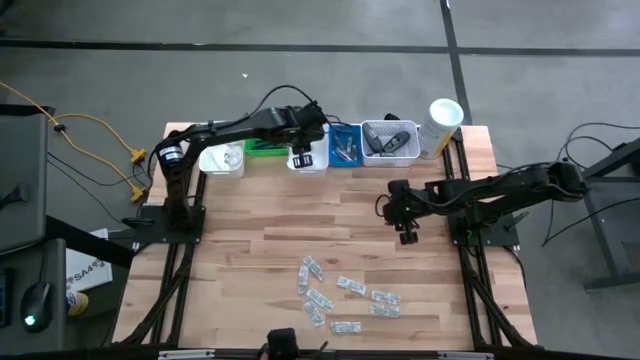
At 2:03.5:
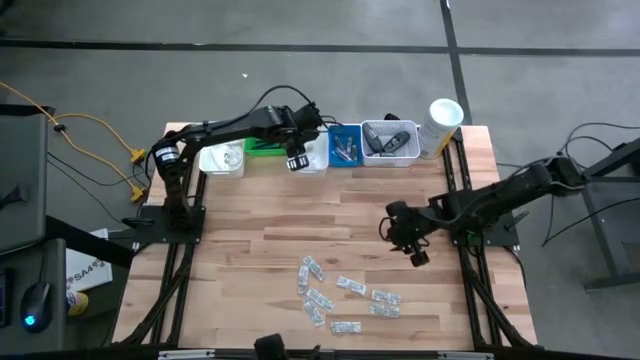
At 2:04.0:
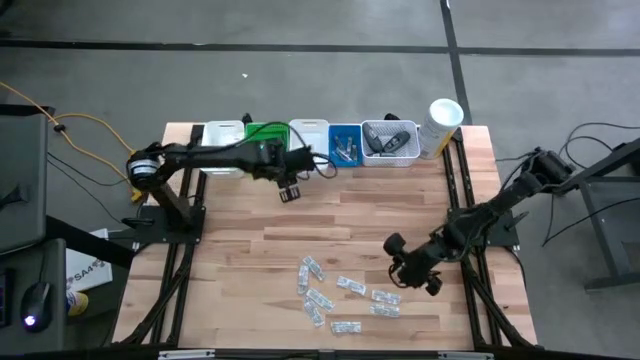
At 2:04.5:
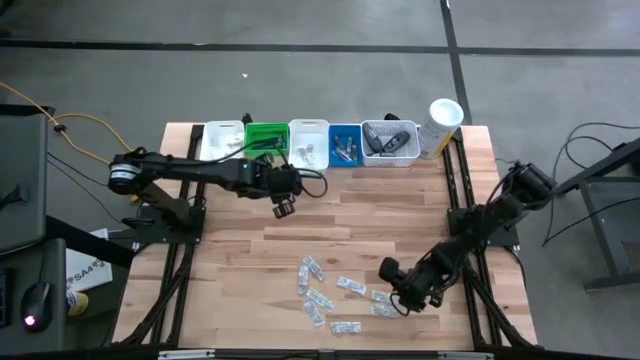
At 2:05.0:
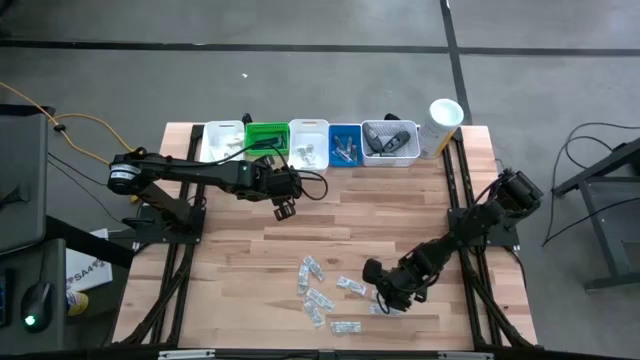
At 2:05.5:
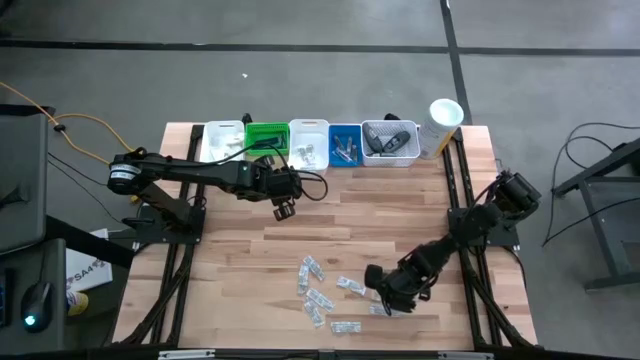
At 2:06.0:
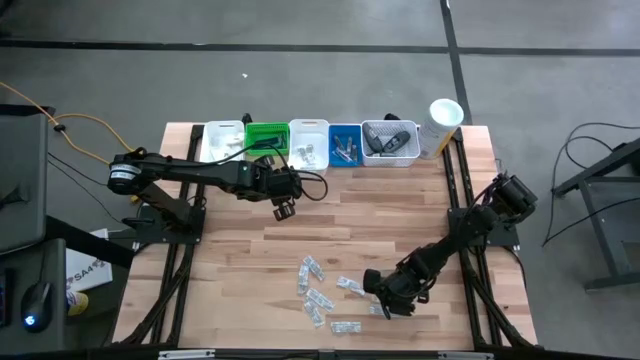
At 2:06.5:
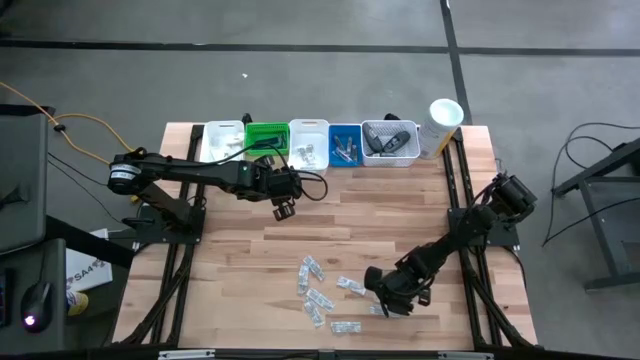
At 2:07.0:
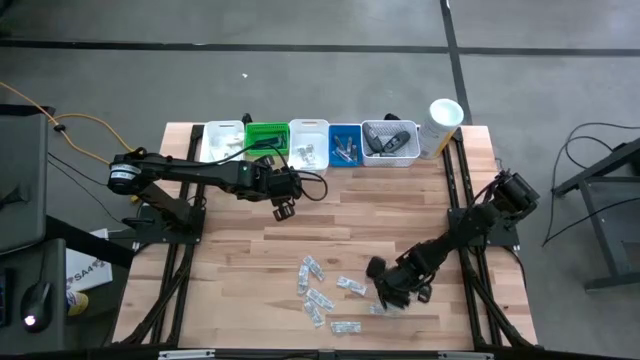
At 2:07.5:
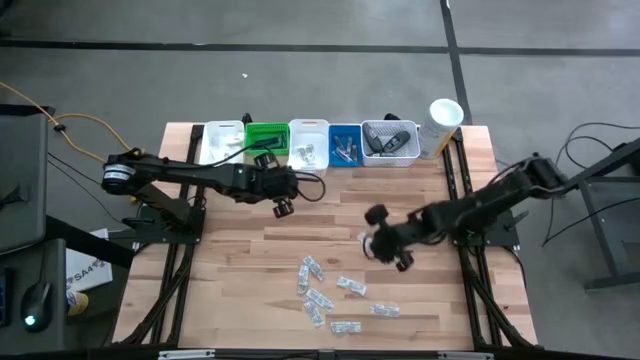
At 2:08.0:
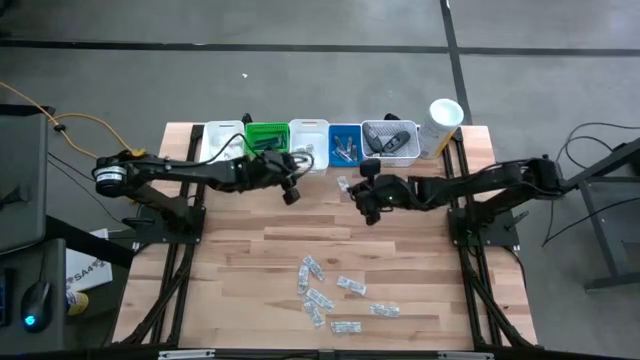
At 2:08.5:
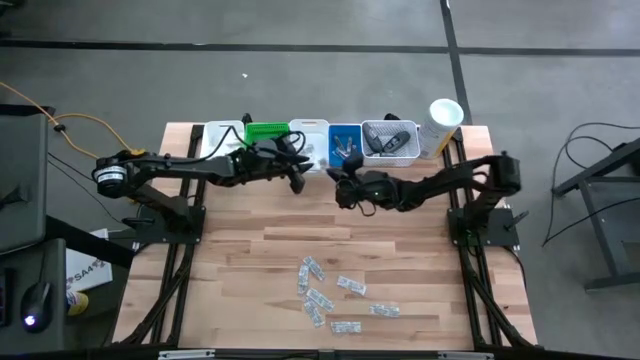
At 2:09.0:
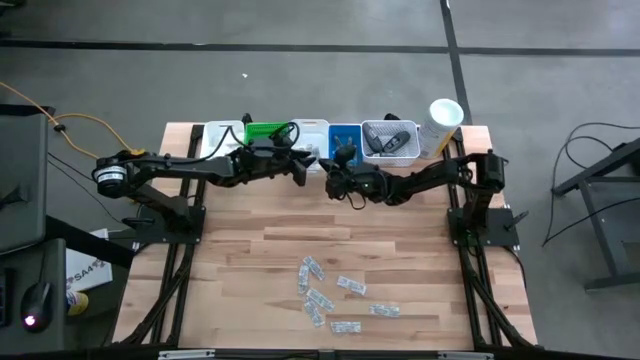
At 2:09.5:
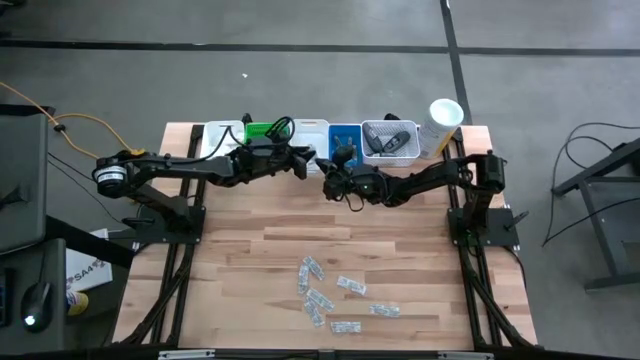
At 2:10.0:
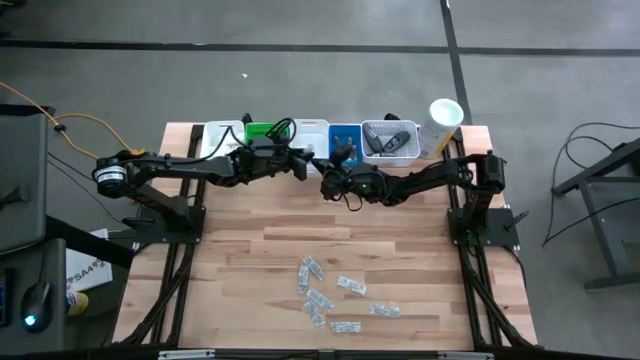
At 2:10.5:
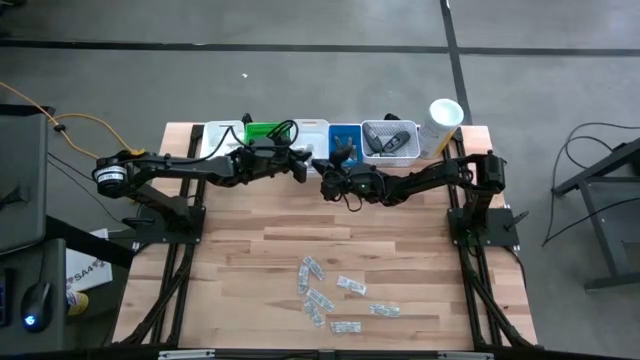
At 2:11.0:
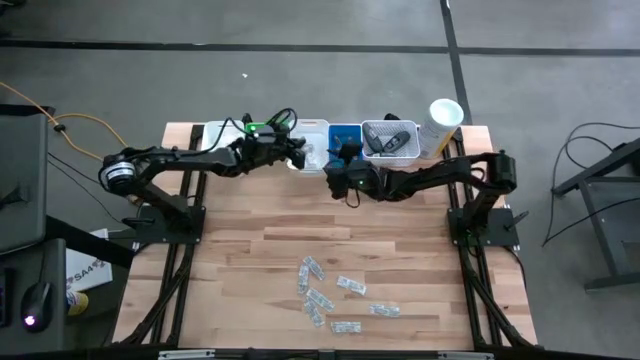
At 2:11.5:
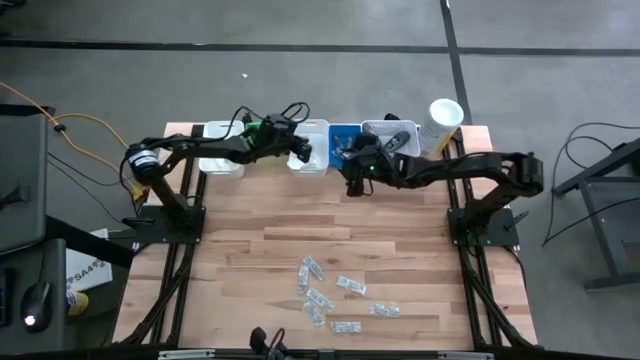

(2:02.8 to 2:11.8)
Task: Pick & Place Travel size toiletries
Put the white bandage into the middle white bin

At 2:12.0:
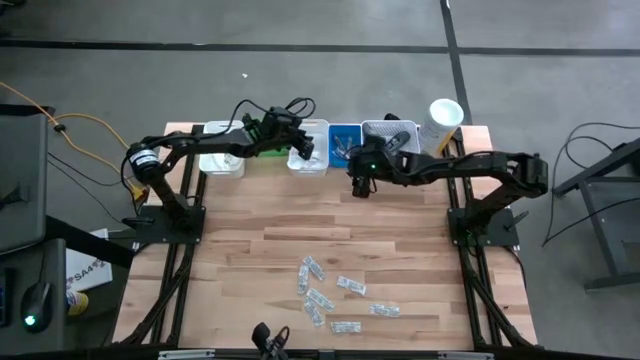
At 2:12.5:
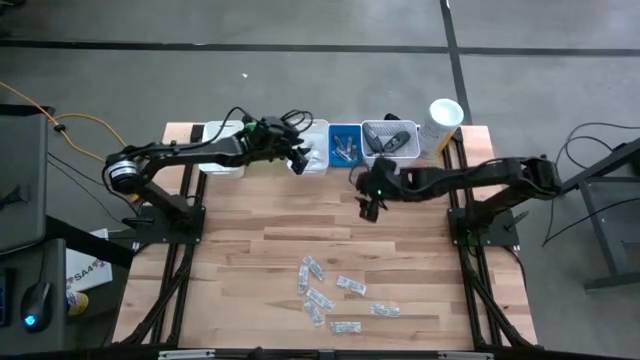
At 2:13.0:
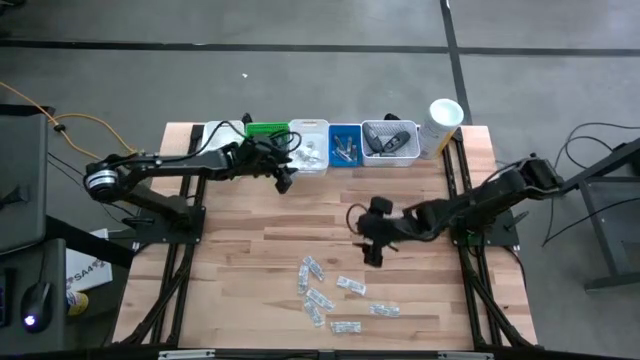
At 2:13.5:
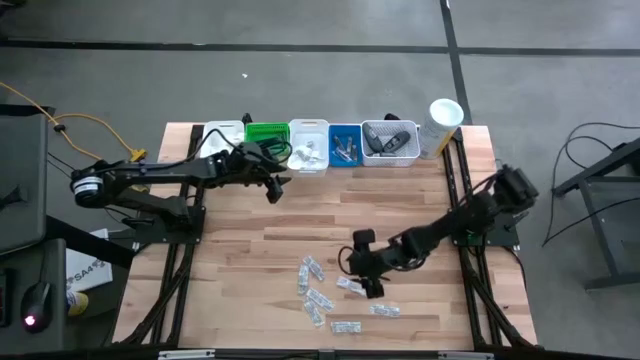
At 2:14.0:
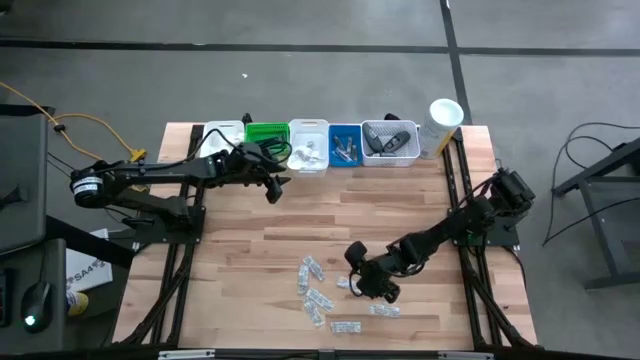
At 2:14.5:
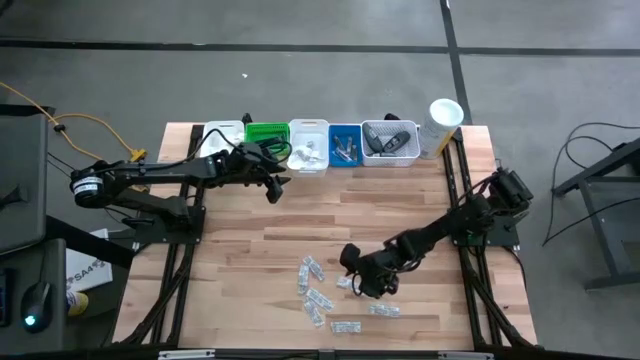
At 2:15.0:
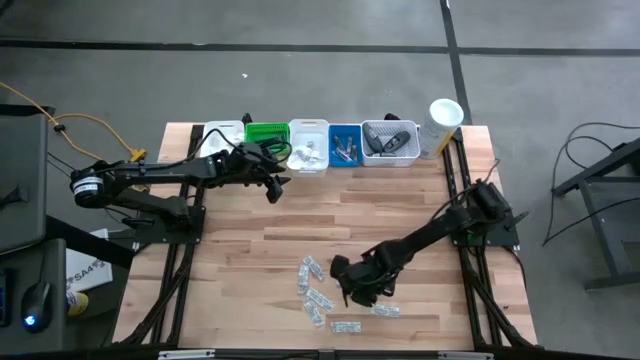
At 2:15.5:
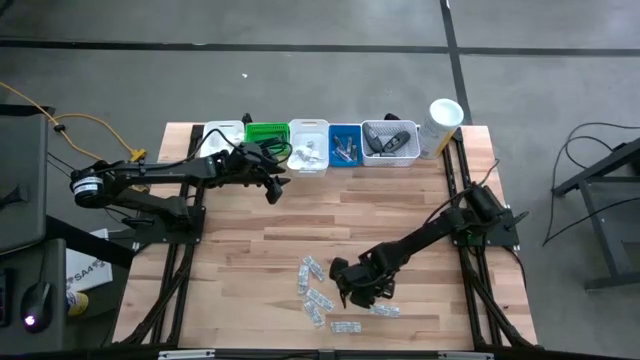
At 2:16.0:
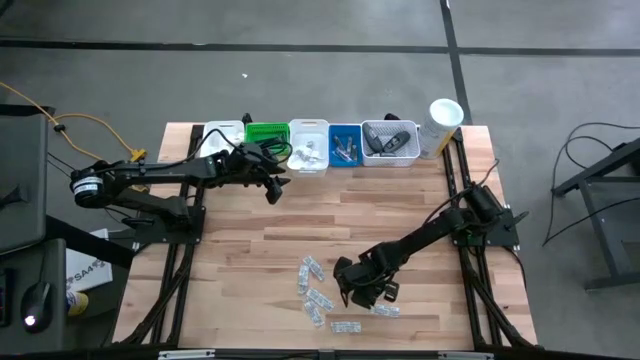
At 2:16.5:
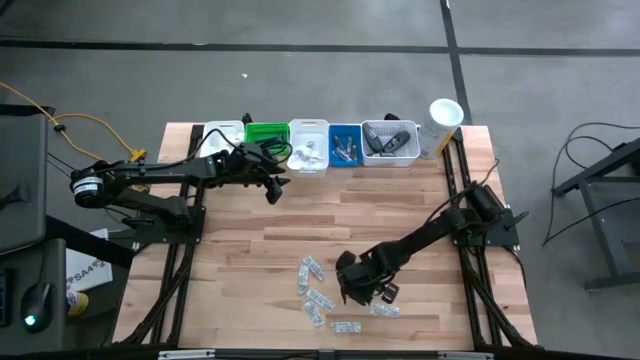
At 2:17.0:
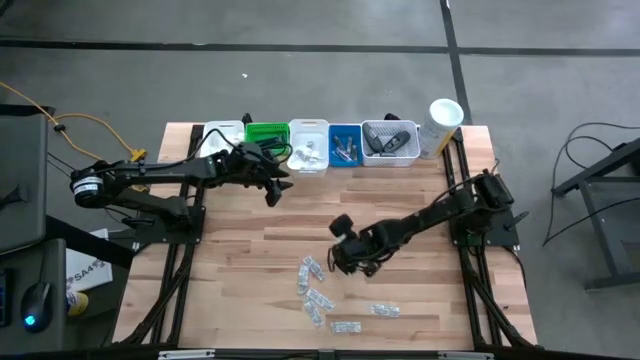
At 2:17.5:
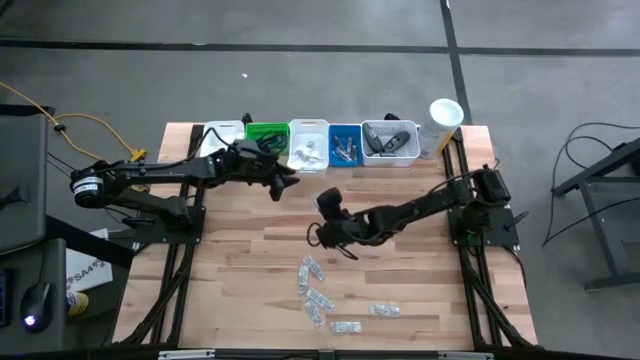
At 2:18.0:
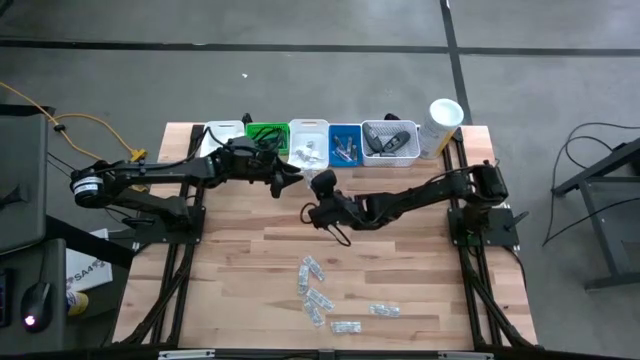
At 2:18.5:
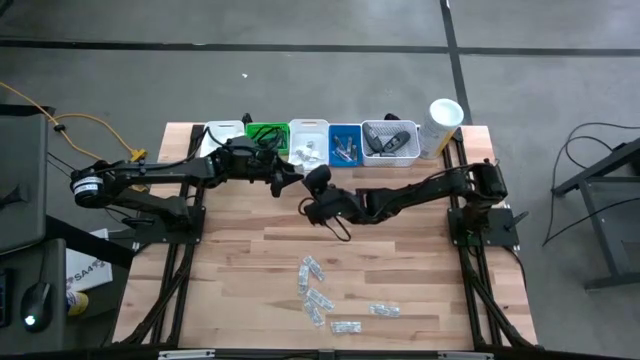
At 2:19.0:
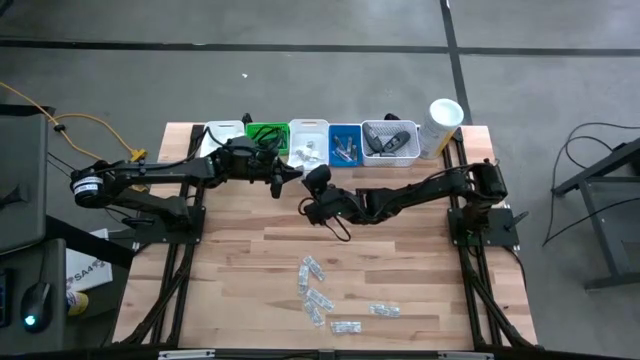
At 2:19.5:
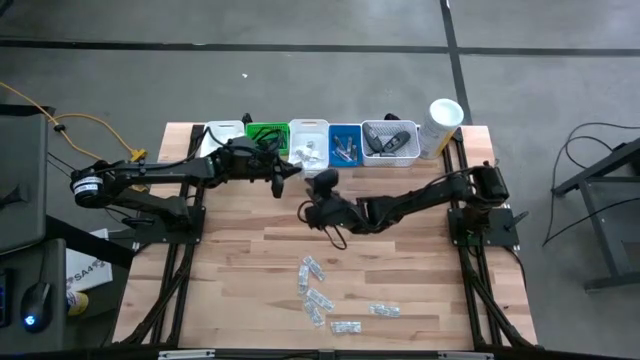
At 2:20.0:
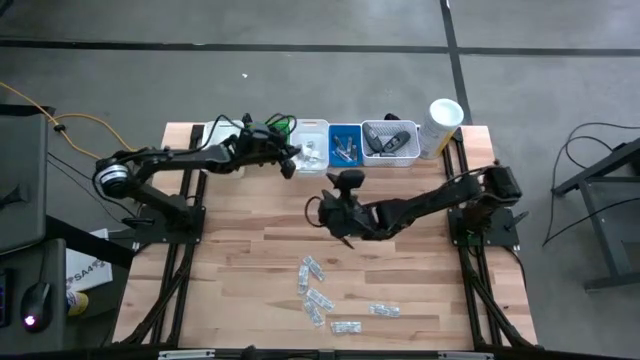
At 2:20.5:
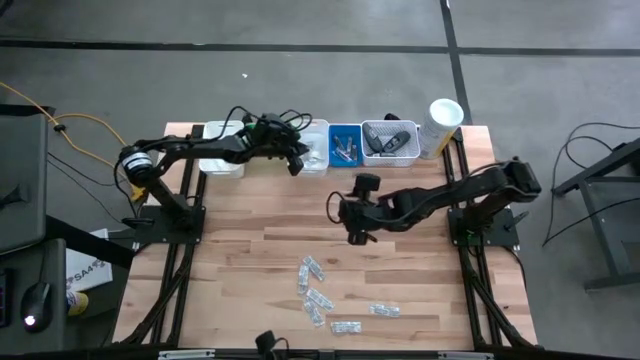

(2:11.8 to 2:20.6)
Put the white bandage into the middle white bin

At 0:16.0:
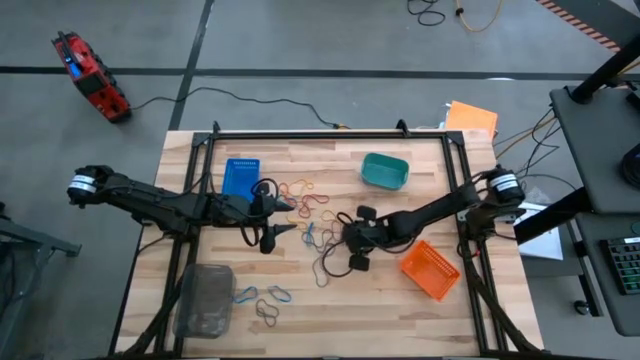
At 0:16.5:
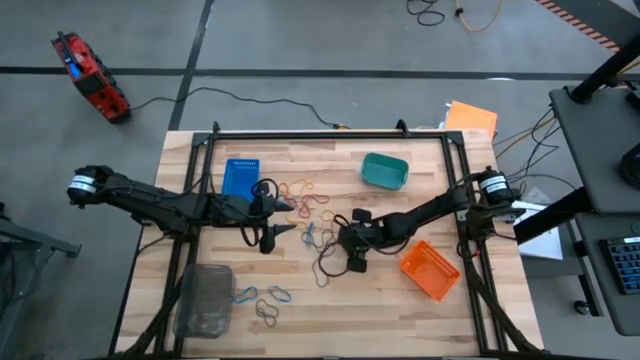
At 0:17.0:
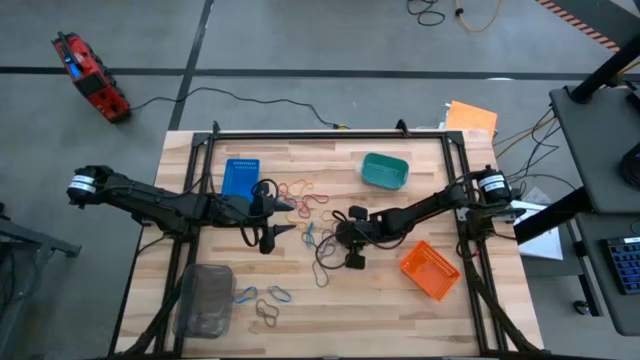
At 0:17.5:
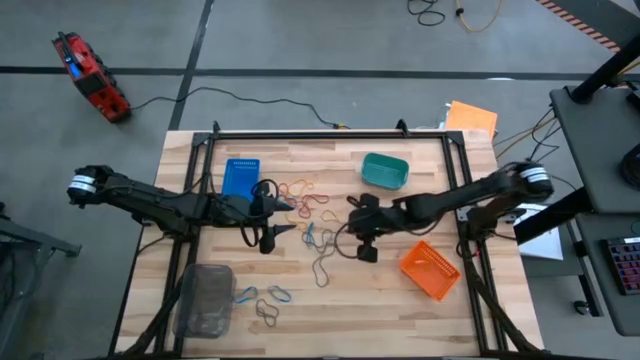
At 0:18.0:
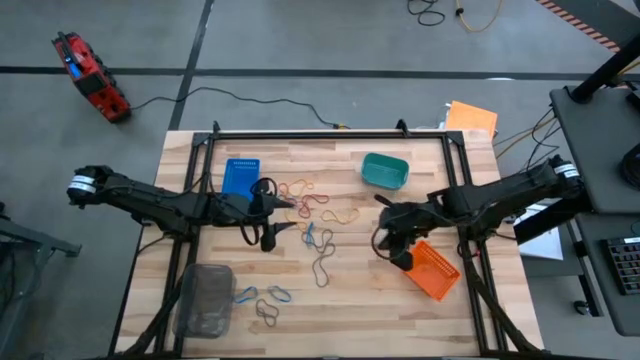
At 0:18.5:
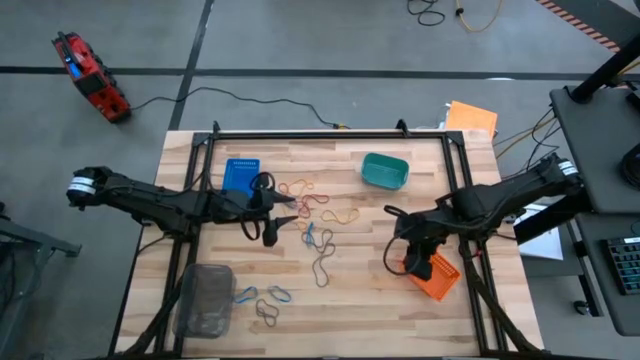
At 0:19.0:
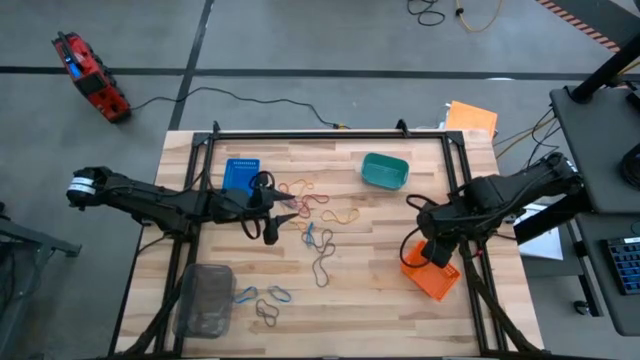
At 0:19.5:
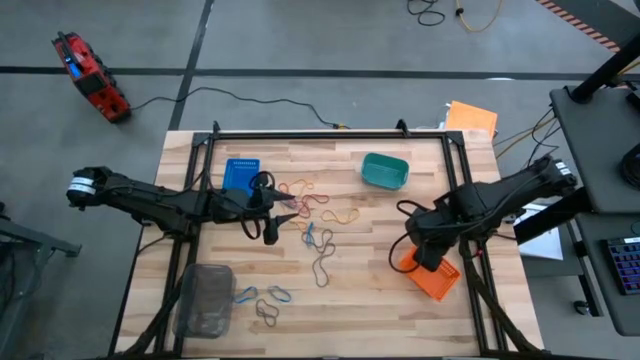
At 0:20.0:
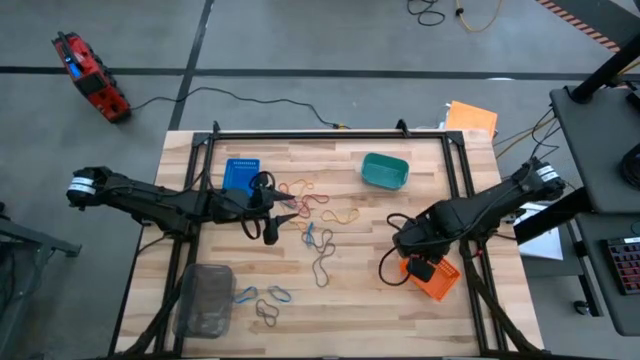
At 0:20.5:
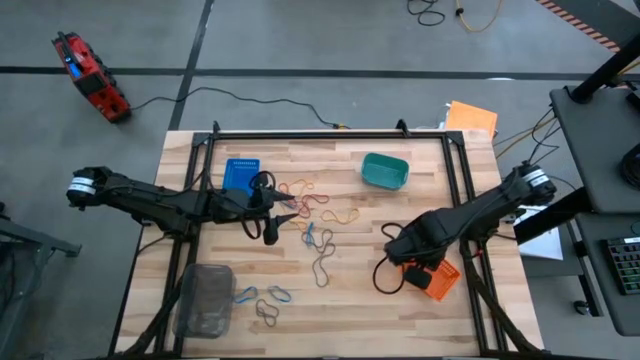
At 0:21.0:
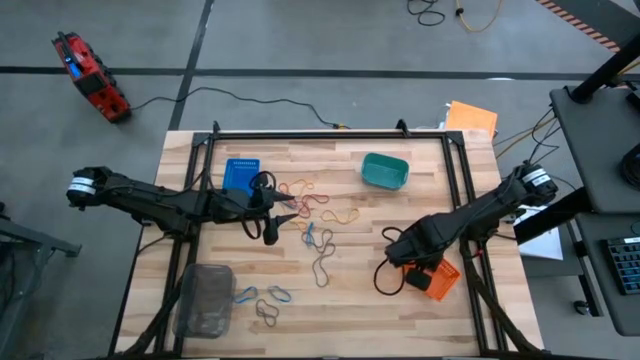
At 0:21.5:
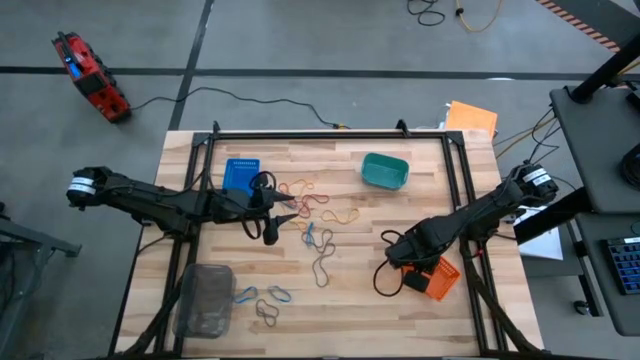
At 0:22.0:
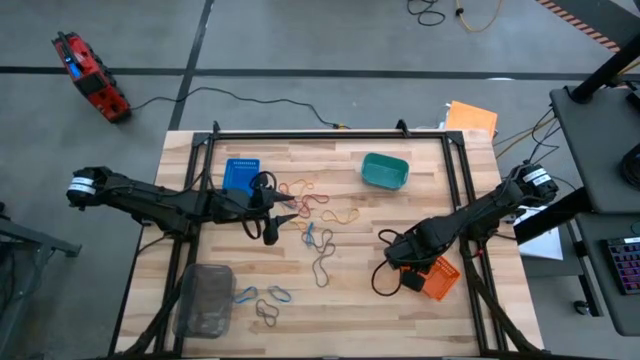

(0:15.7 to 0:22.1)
Task: Sort rubber bands into baskets
Put the red rubberband into the orange bin
